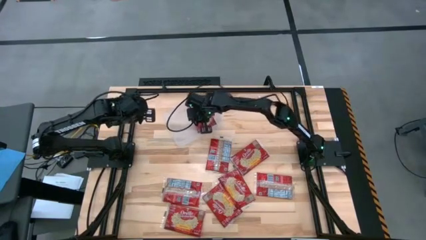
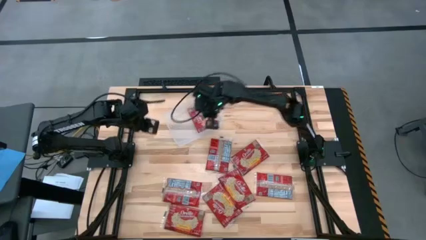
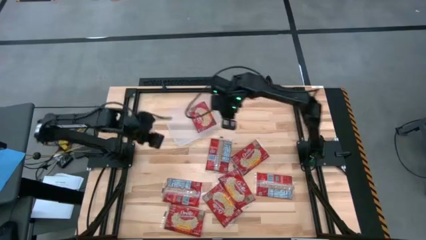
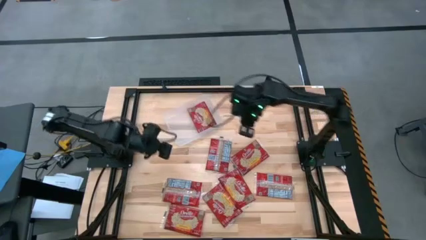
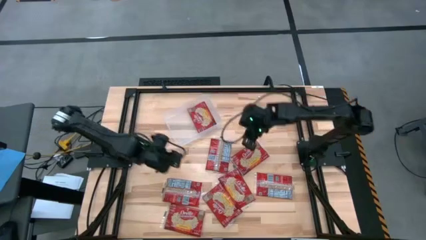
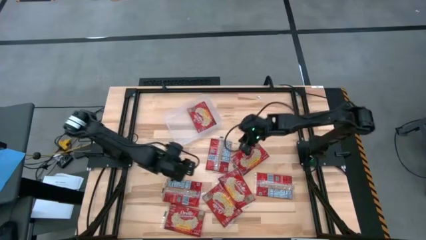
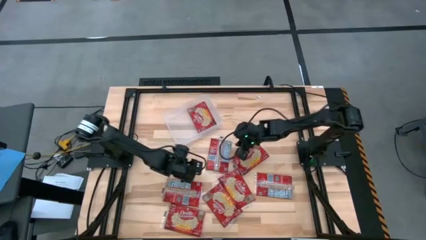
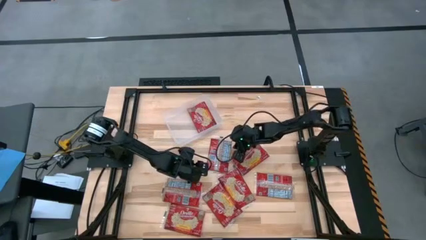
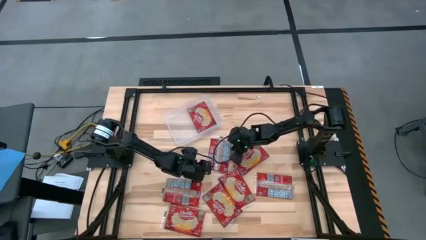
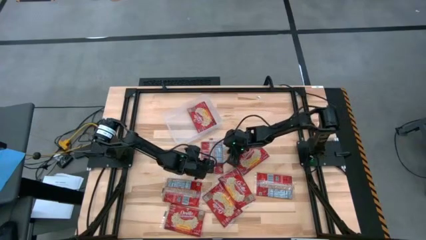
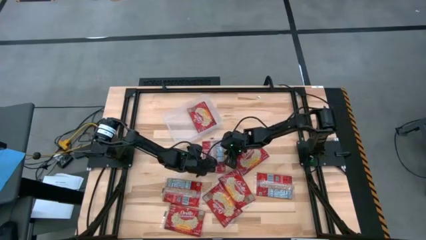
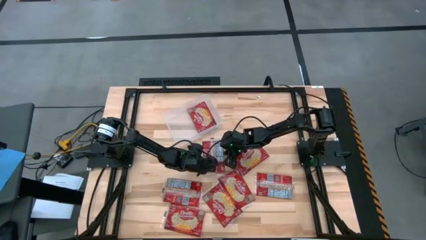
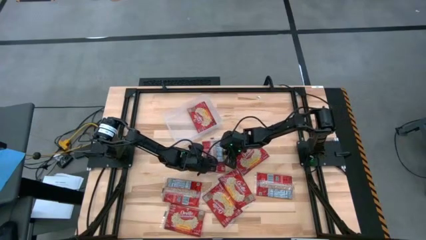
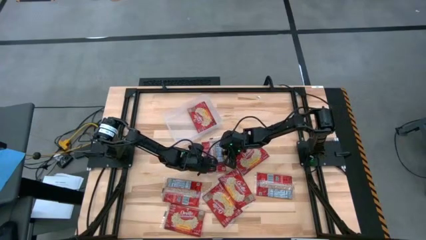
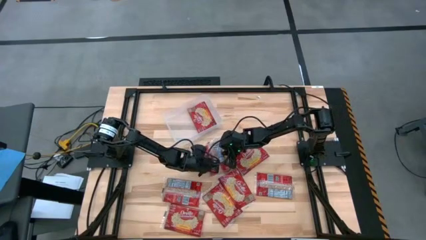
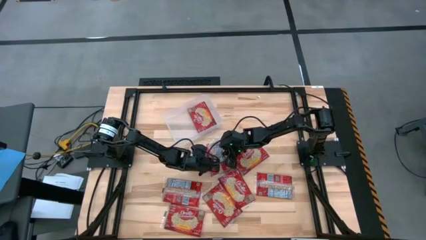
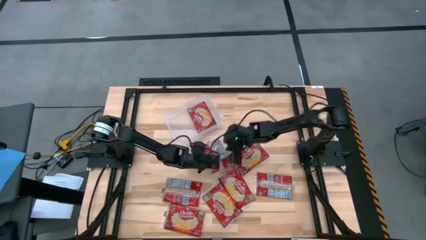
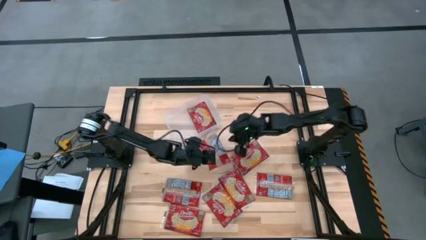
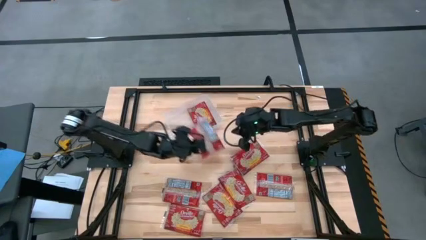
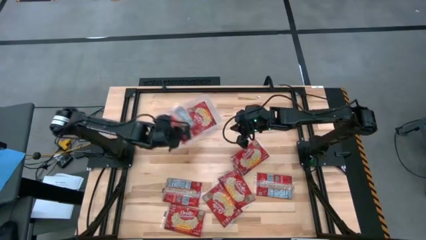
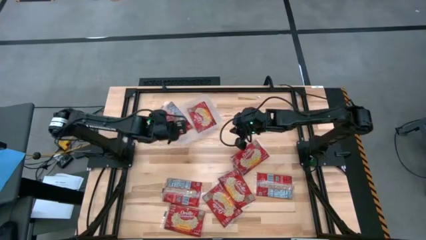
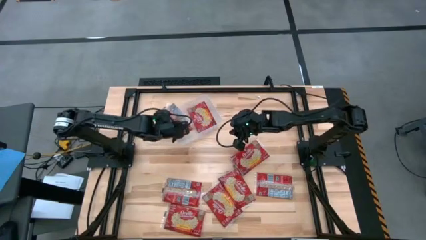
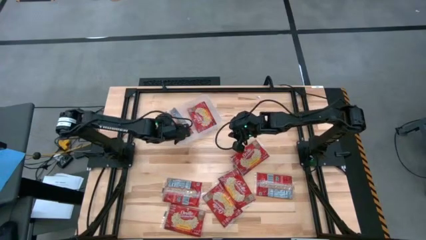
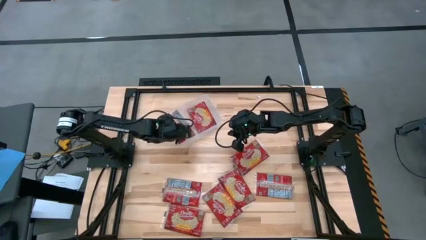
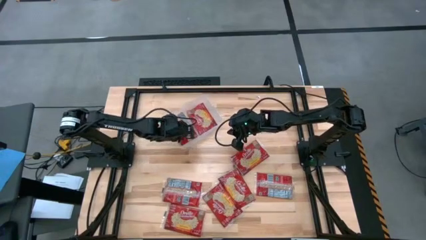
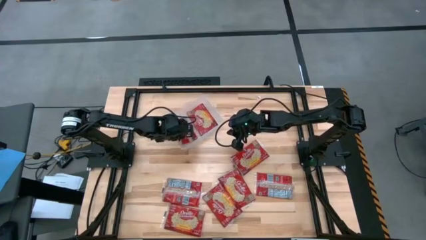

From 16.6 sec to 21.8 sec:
Task: Sort popcorn bags into baskets
Put the red popcorn bag into the transparent bin

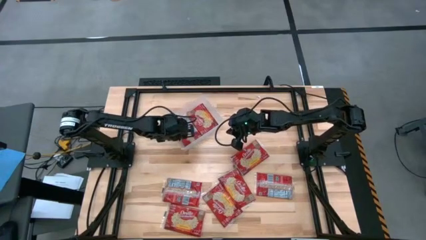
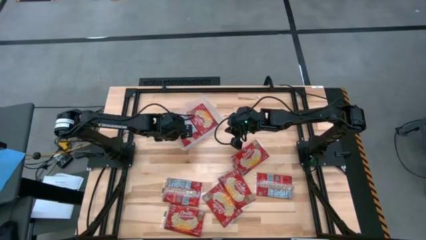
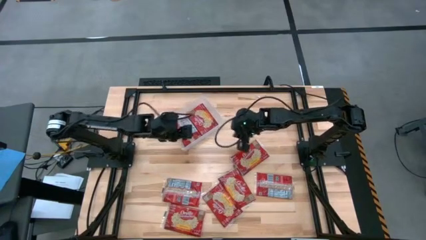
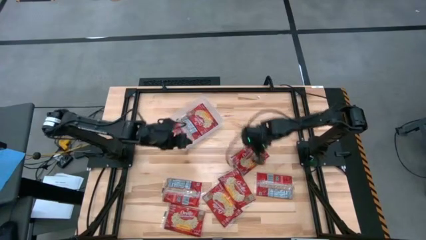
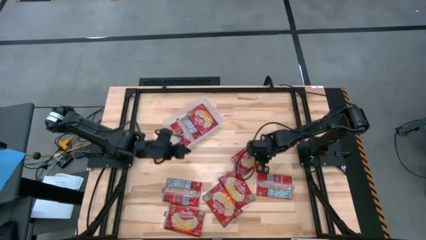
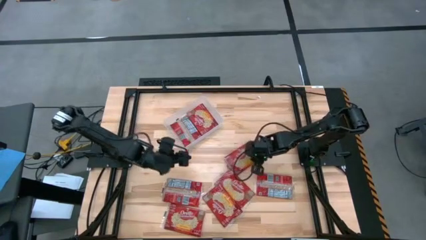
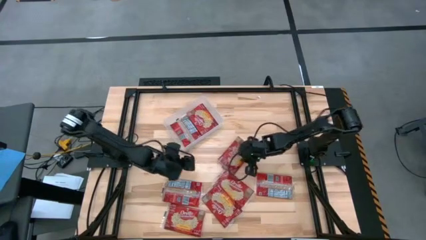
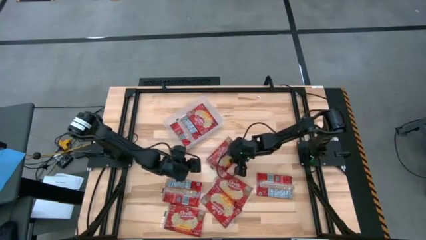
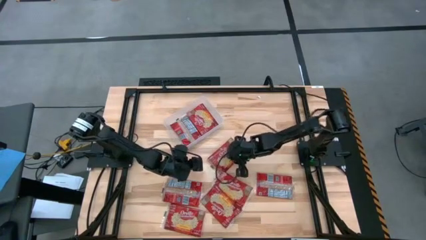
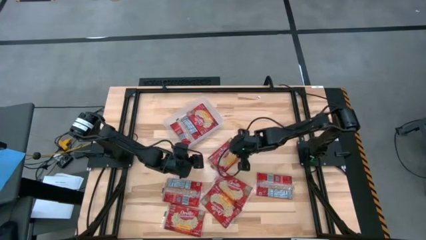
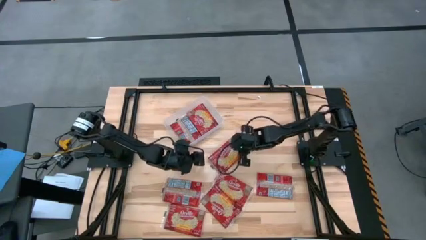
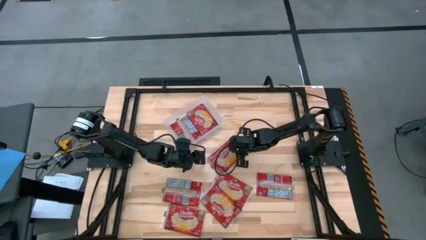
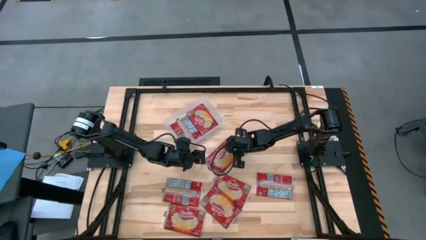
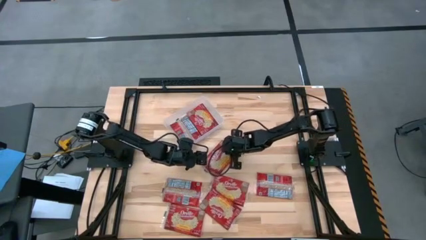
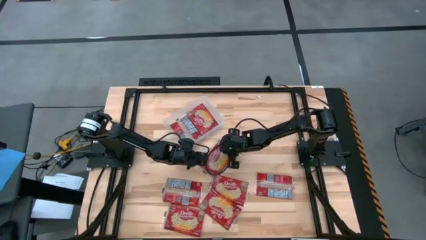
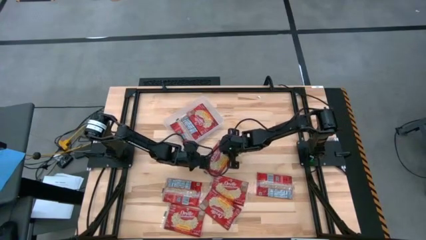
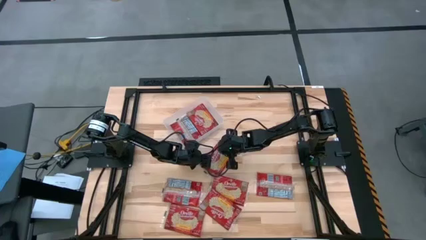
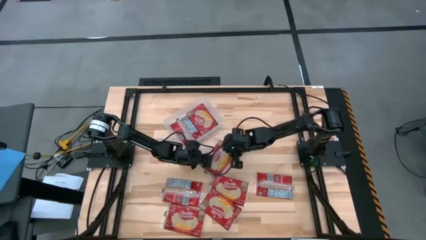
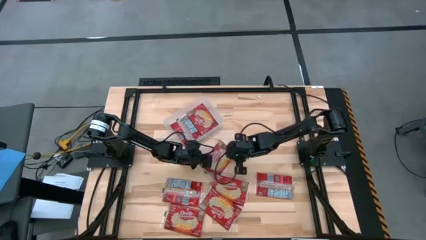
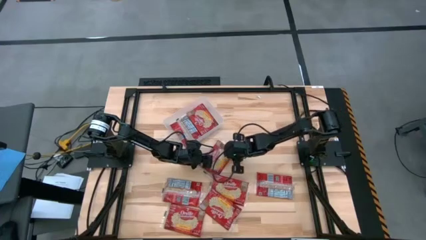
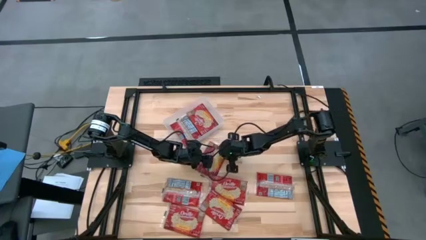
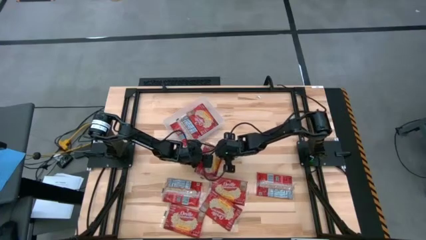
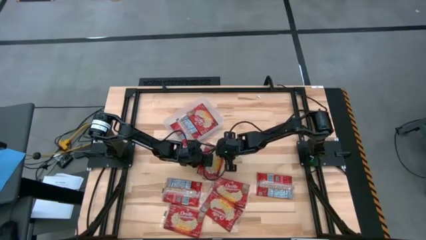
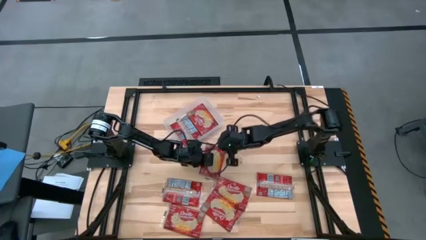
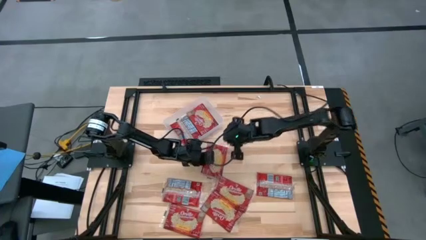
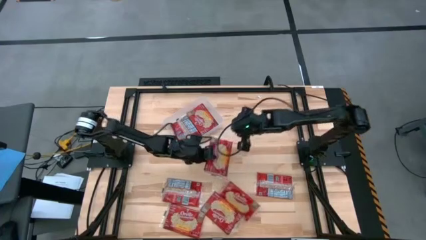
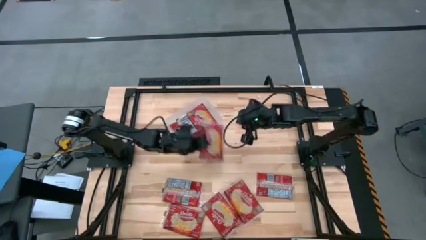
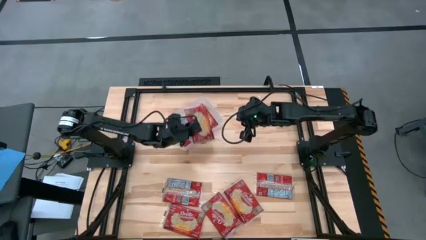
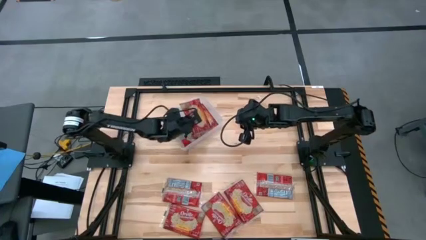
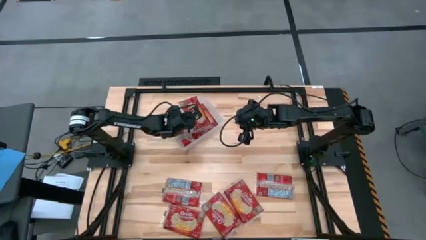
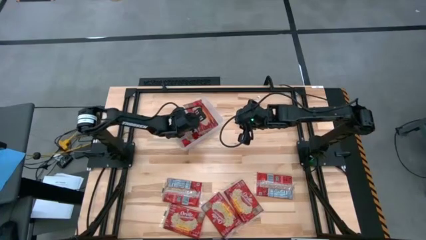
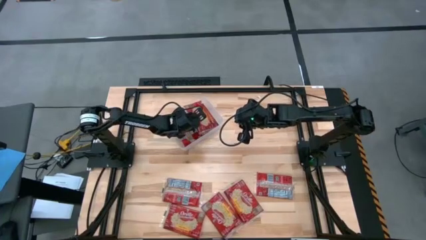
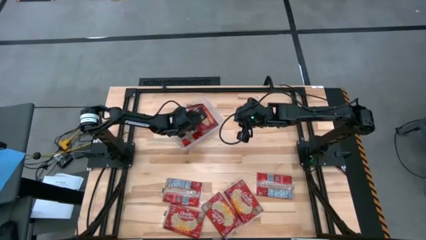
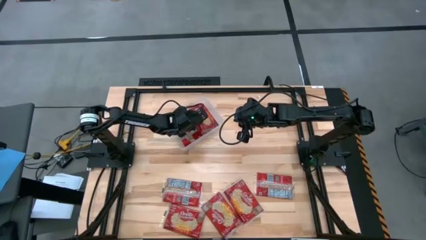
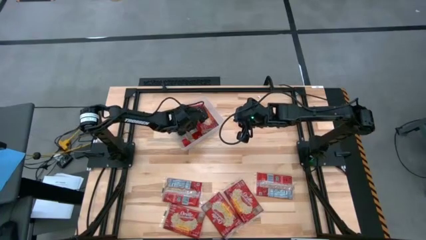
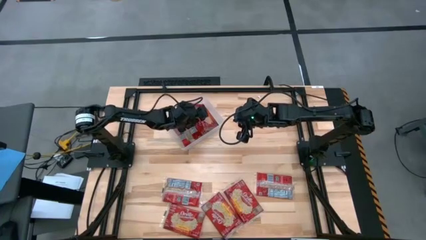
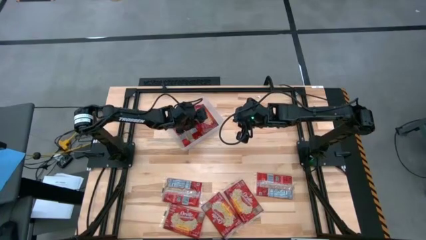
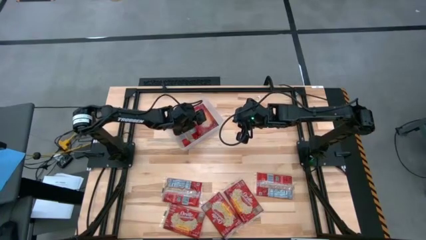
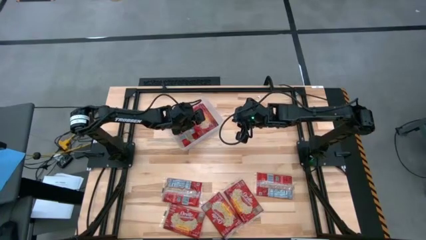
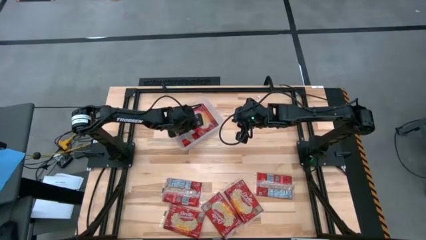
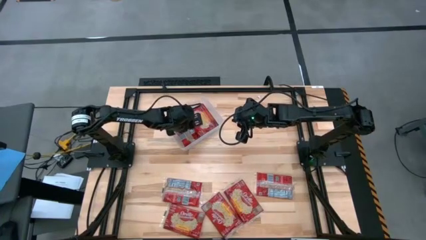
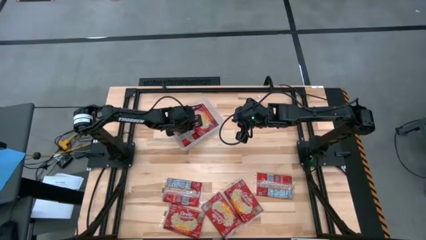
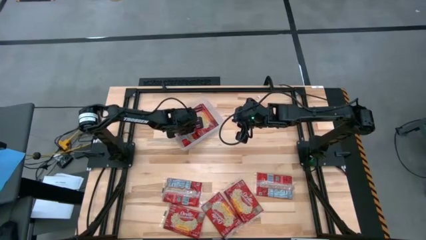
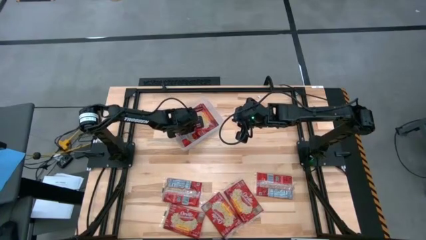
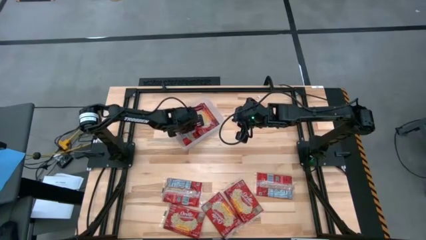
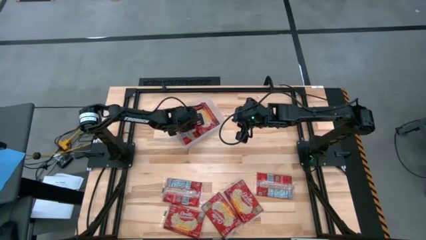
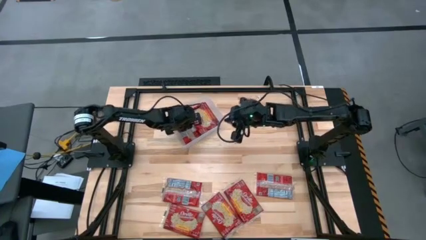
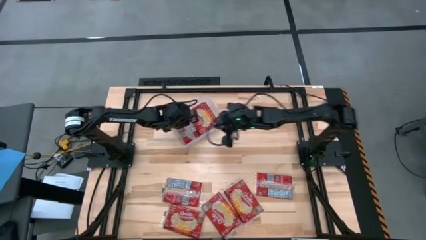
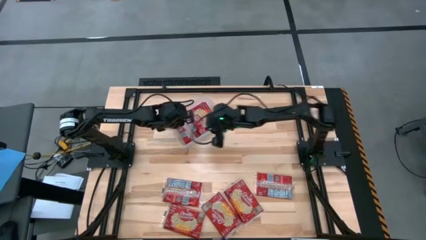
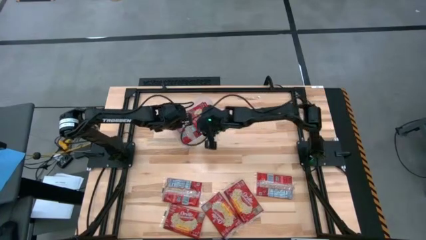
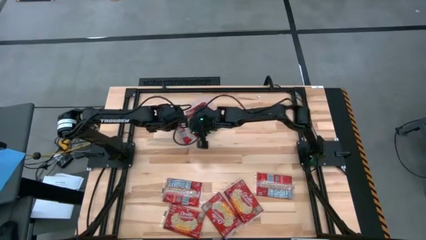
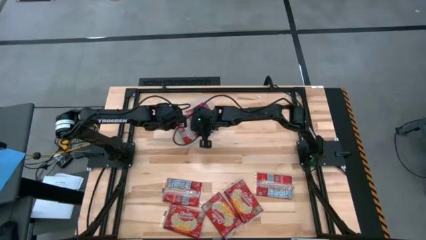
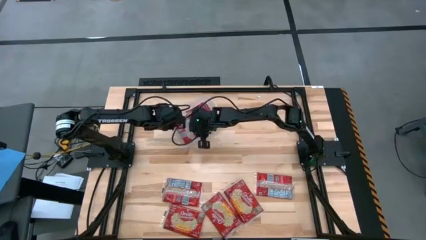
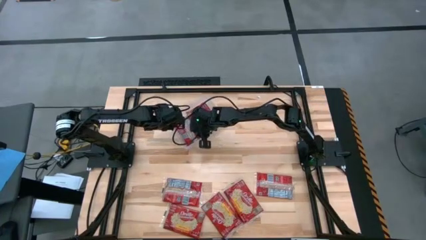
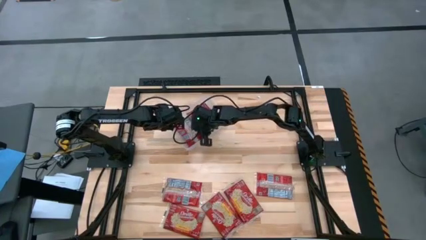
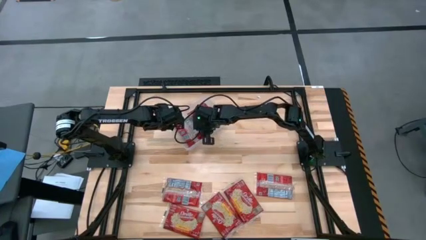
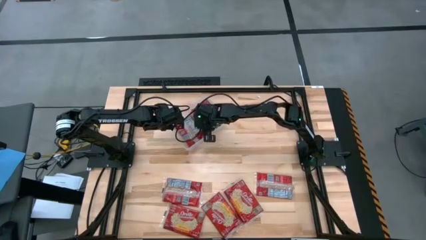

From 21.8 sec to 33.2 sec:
Put the red popcorn bag into the transparent bin
